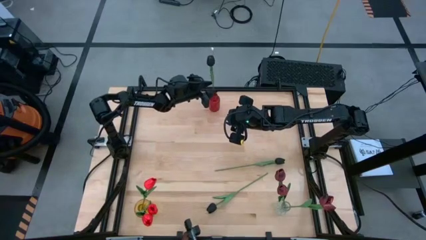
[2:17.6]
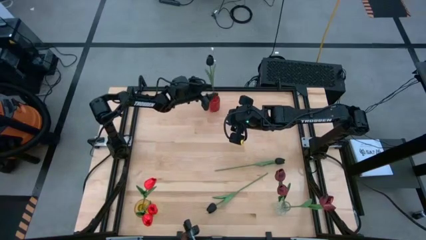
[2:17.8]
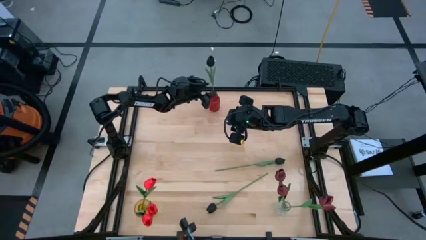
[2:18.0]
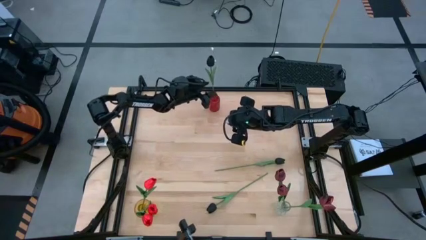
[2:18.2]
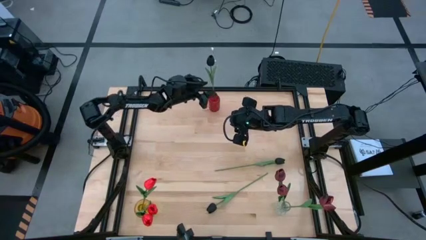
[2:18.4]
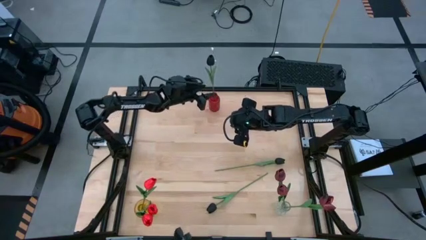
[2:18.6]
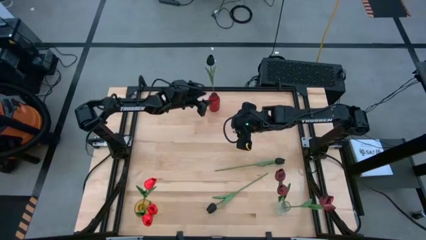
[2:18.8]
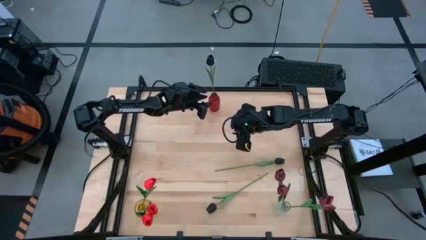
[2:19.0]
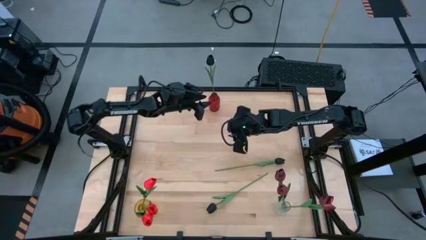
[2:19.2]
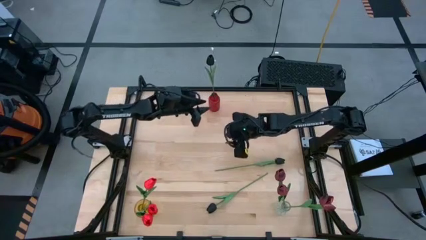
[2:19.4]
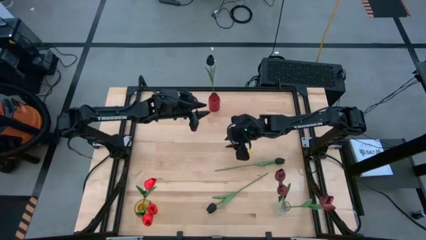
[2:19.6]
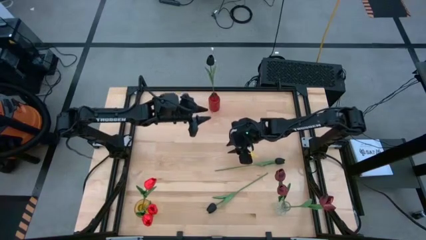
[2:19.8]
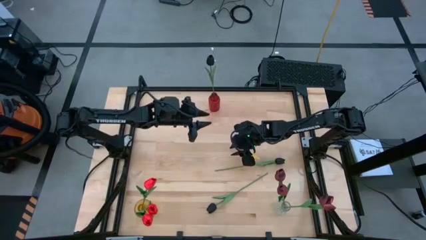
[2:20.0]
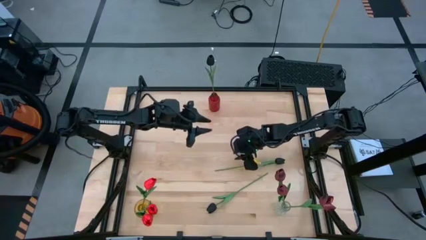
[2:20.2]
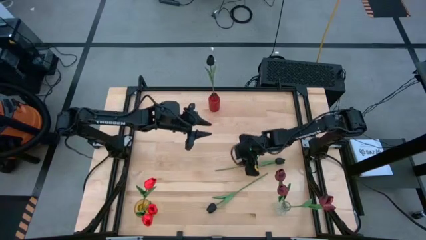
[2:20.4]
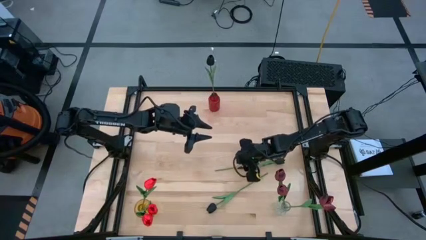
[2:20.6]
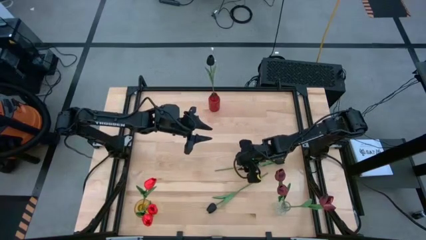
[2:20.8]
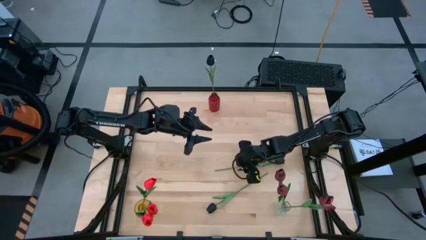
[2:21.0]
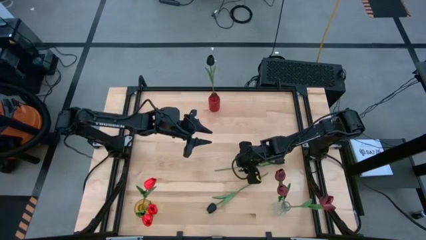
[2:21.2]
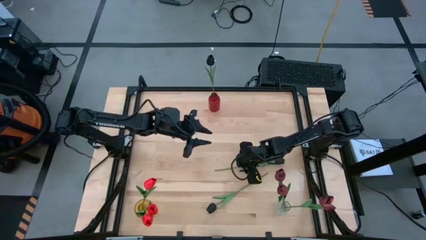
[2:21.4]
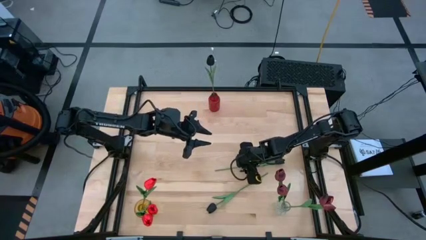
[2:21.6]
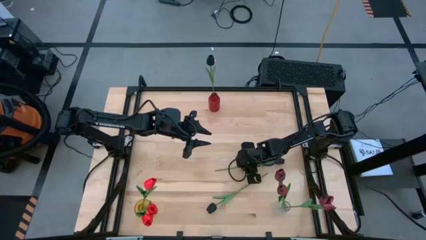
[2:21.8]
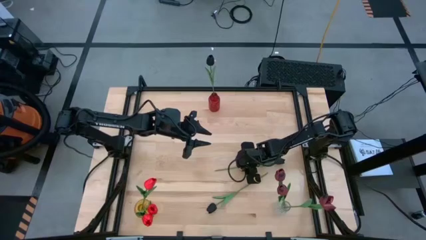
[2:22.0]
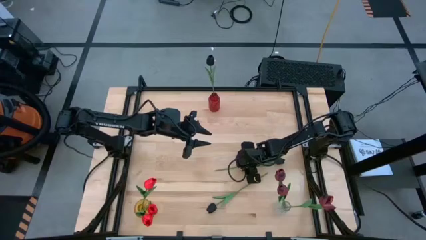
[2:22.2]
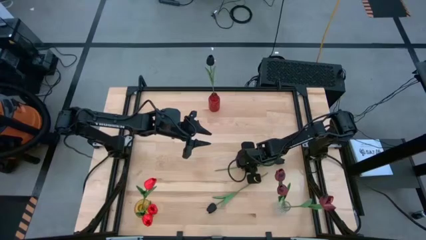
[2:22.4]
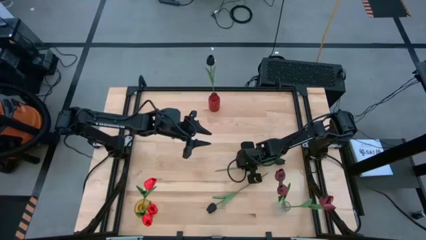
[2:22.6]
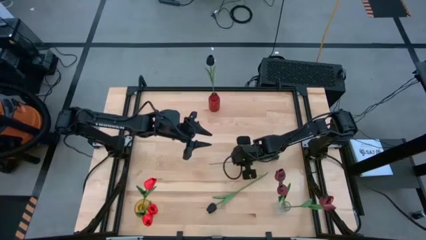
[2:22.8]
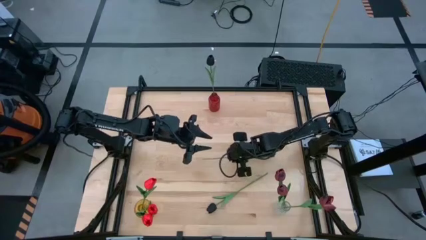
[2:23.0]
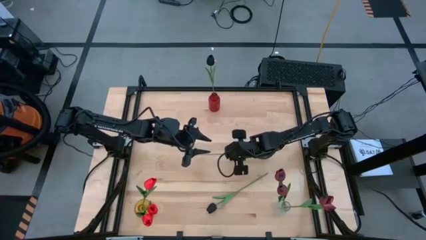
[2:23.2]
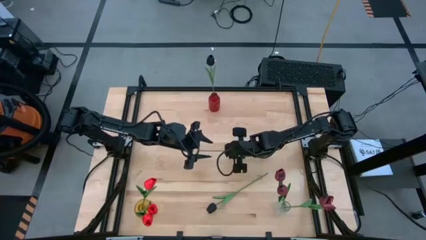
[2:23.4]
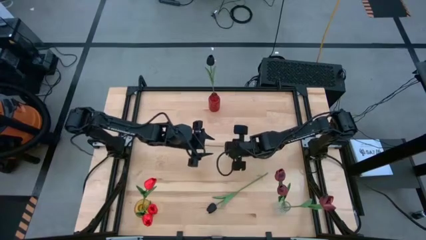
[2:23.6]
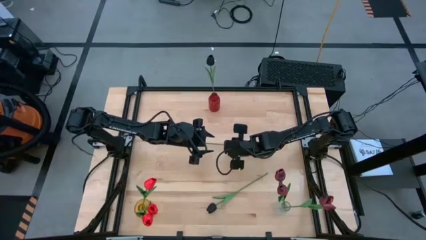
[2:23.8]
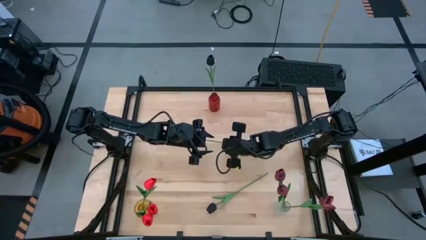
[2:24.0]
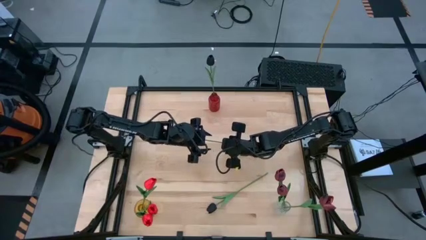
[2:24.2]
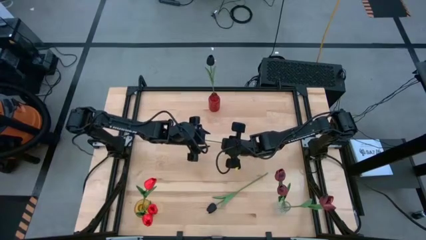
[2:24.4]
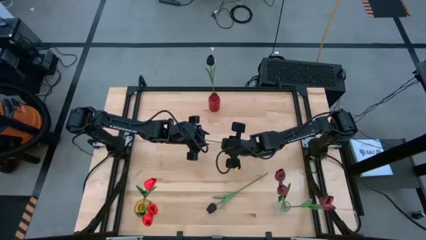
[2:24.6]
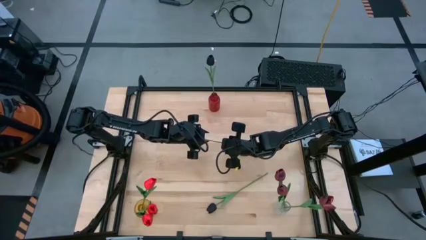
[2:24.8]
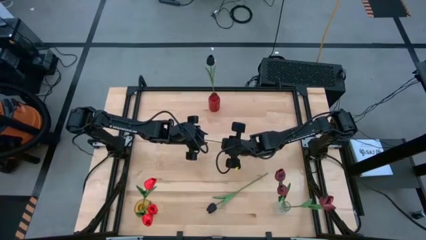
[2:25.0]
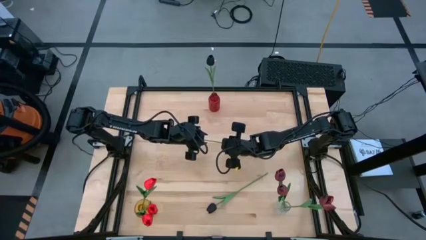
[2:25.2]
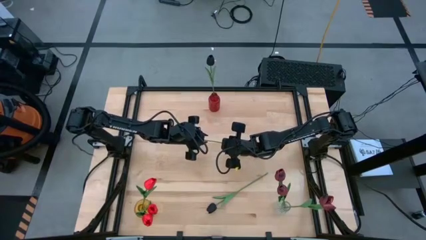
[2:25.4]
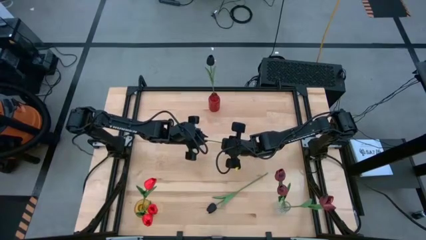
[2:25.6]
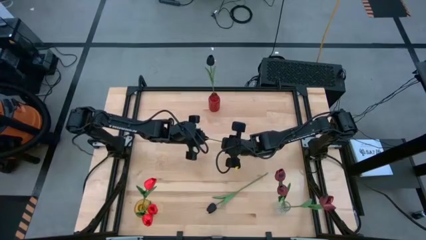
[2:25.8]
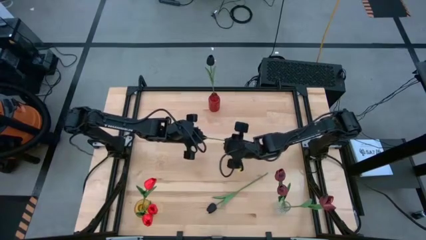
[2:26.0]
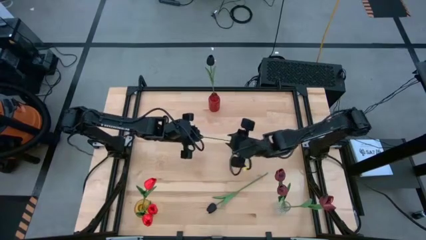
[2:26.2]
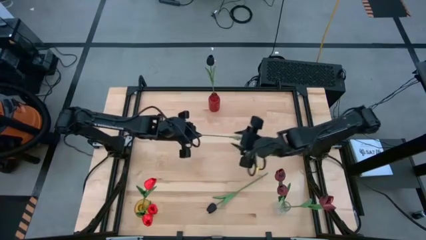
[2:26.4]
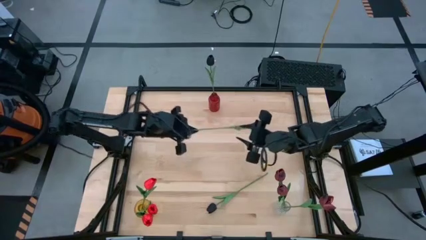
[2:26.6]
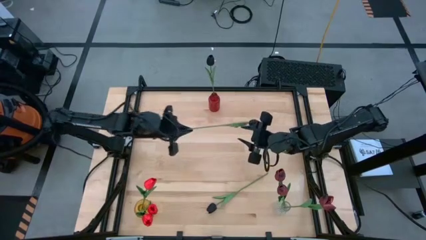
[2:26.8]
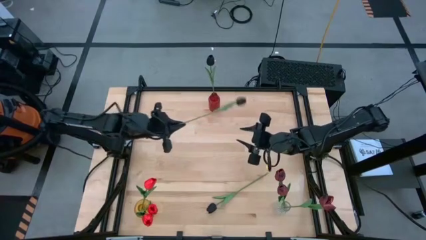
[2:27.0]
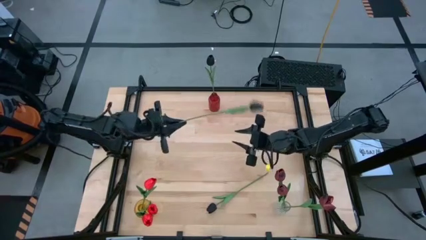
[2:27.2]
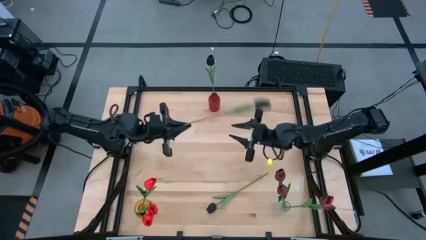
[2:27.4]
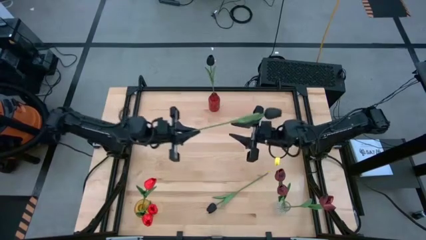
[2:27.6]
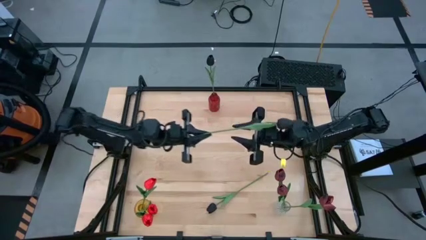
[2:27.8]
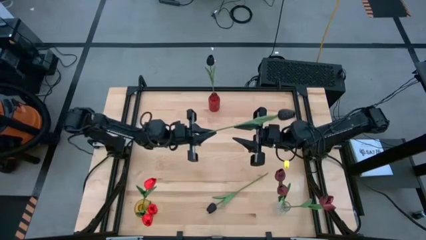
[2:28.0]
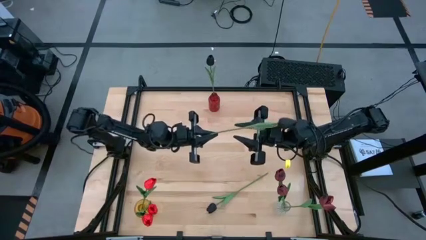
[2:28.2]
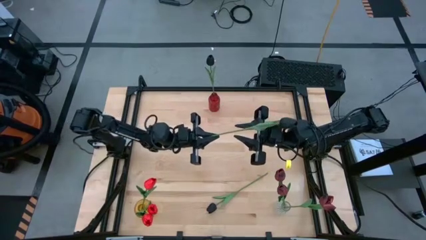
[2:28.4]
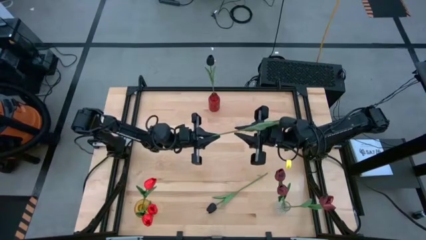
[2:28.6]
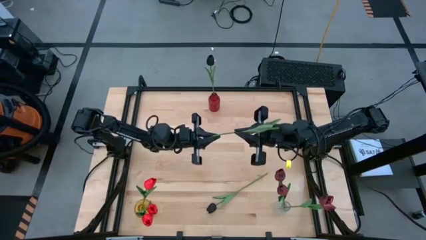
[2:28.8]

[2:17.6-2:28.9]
Task: Sort flowers into vase by color
Put the top black flower into the red vase

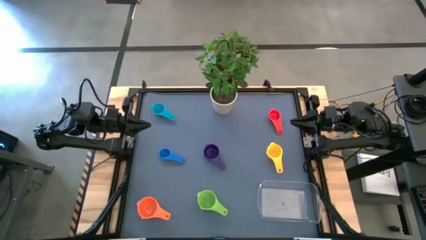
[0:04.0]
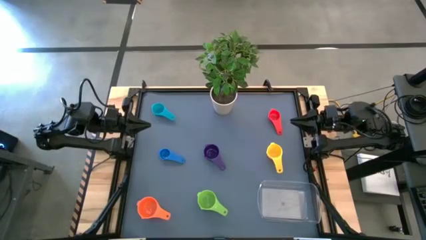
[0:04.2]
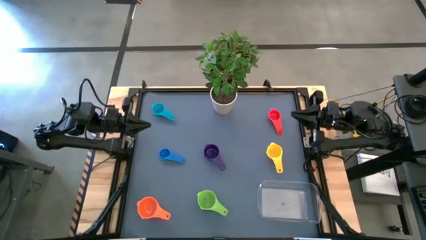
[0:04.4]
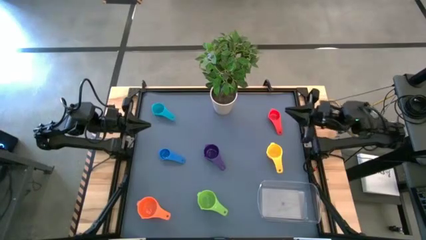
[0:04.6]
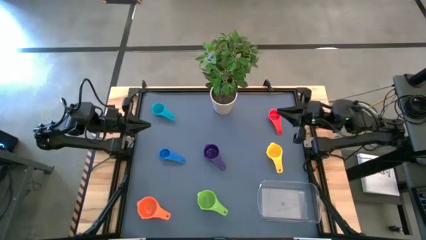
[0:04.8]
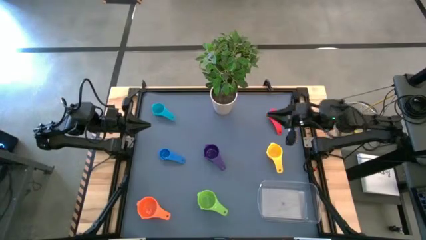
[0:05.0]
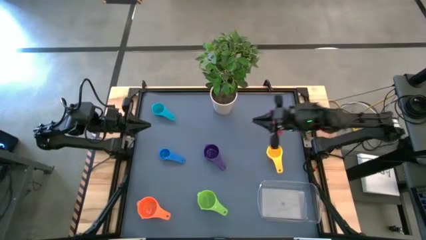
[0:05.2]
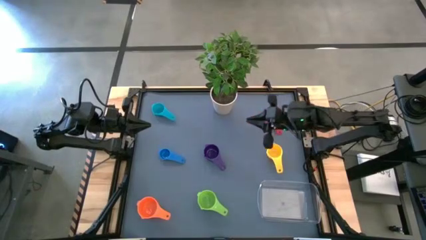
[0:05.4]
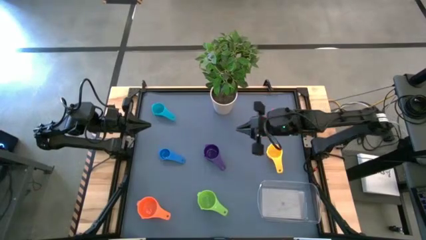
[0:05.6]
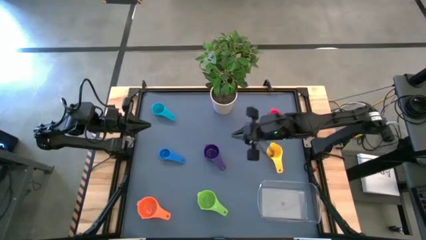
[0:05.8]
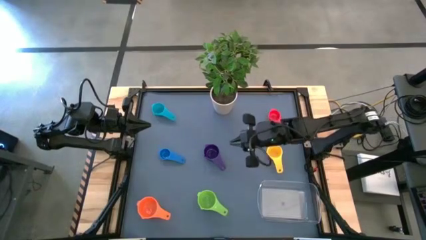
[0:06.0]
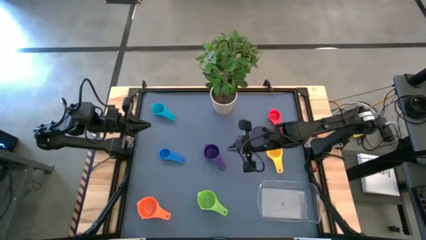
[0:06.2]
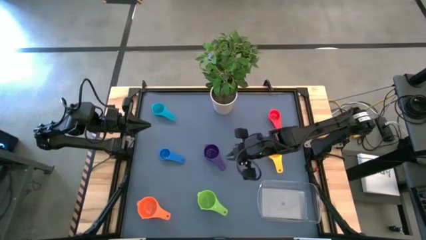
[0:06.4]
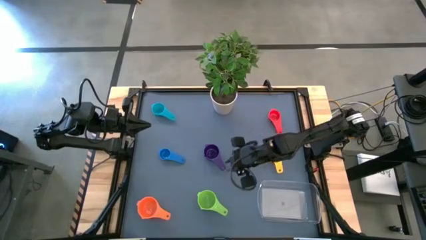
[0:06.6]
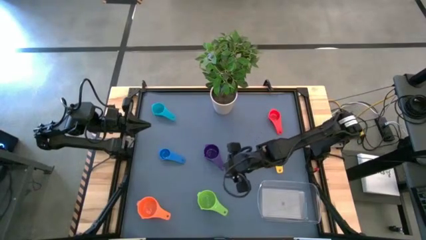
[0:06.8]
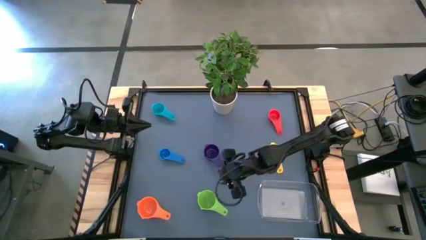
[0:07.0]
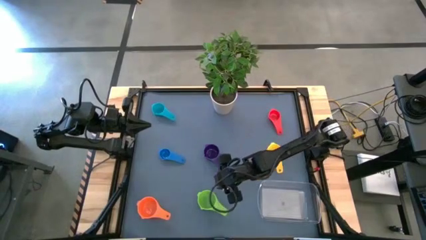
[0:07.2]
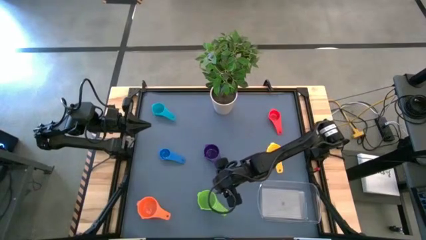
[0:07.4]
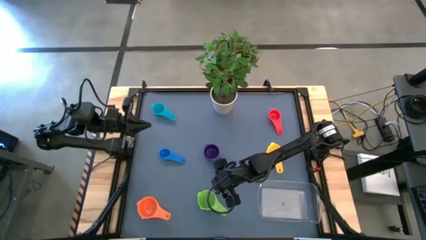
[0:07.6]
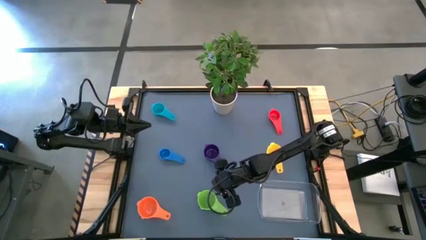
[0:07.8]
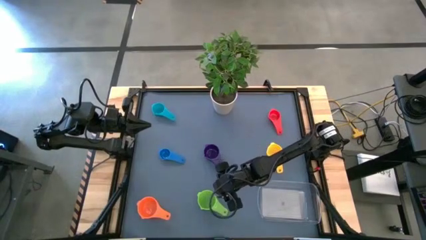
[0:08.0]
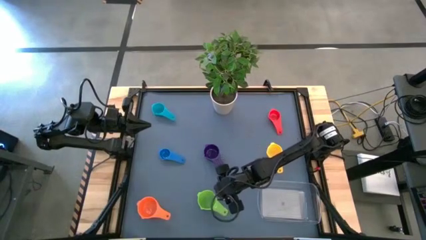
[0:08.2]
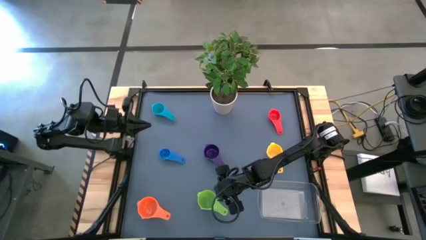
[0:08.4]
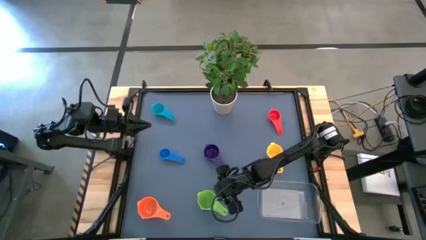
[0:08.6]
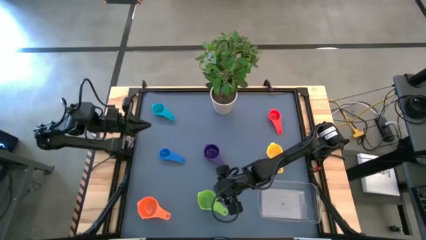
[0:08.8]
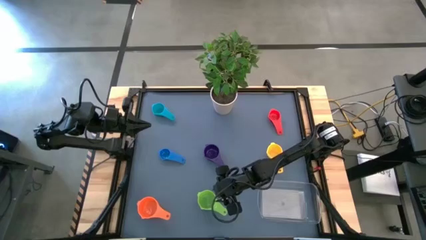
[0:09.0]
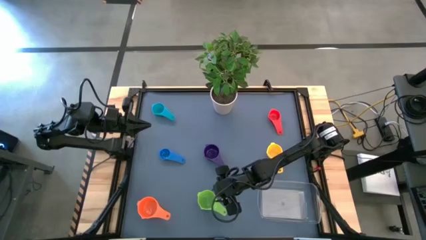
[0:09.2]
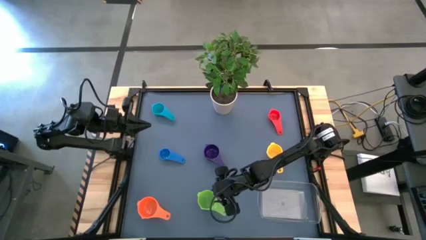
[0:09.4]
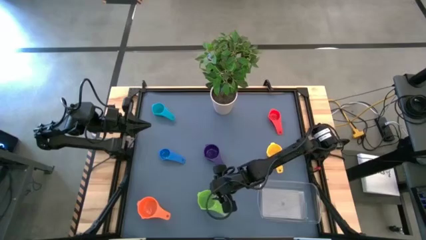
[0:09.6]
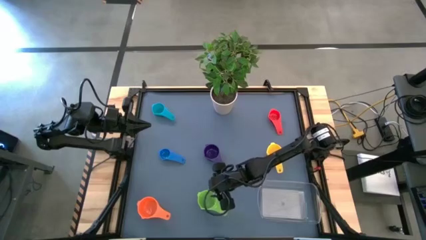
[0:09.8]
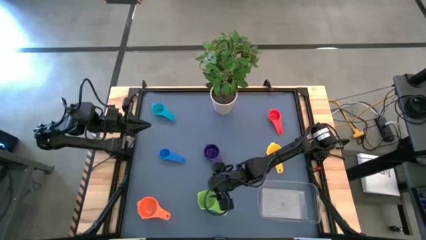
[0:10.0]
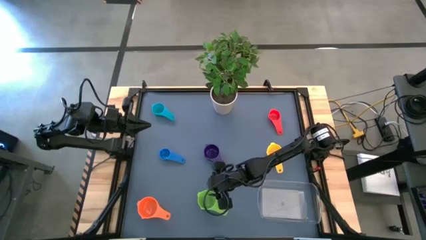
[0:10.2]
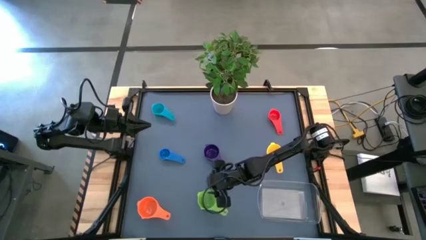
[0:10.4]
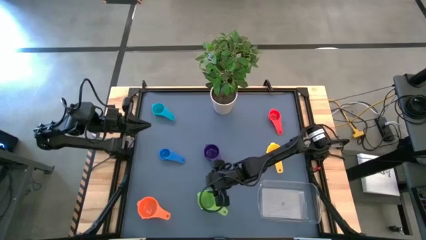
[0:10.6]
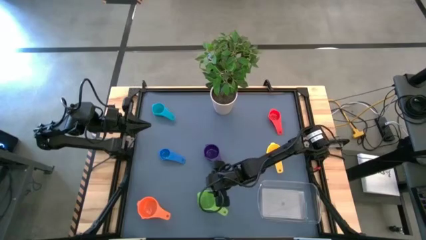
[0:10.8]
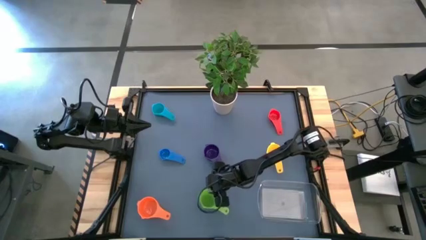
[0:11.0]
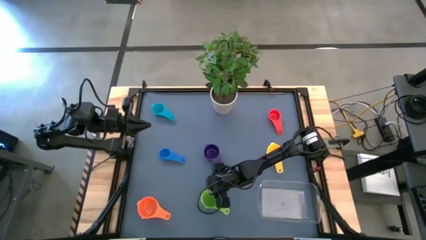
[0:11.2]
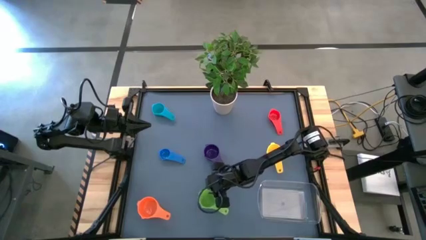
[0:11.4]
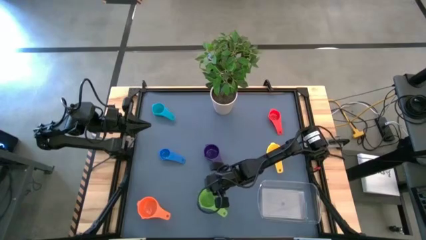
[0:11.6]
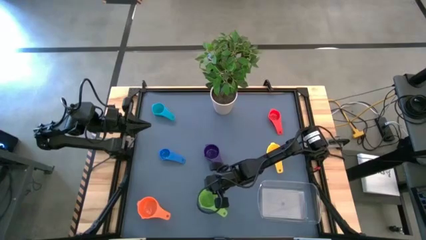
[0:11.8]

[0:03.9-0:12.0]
Task: Nest measuring cups in basket
Stack the green measuring cup on top of the orange measuring cup
